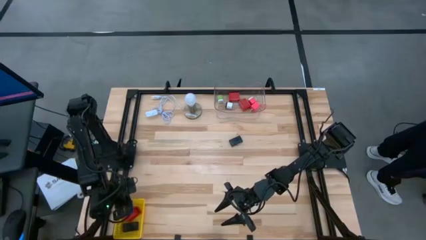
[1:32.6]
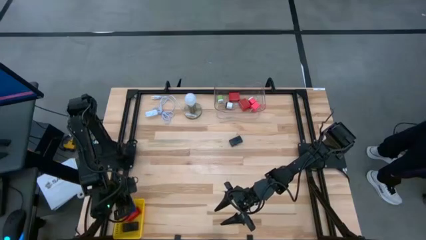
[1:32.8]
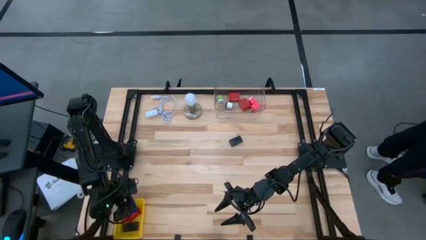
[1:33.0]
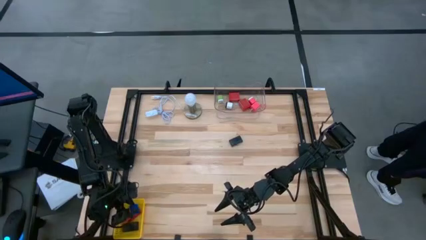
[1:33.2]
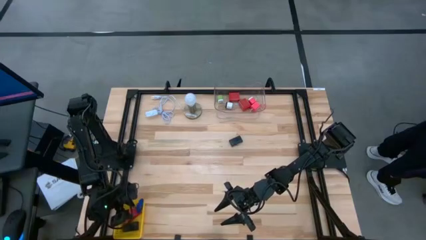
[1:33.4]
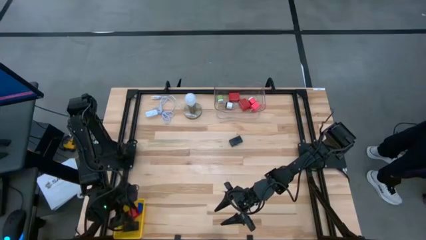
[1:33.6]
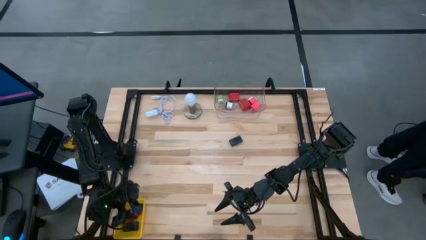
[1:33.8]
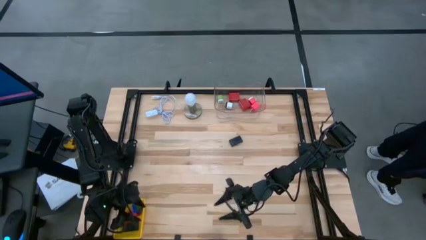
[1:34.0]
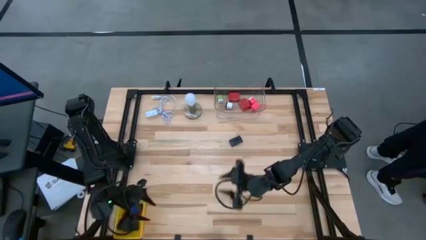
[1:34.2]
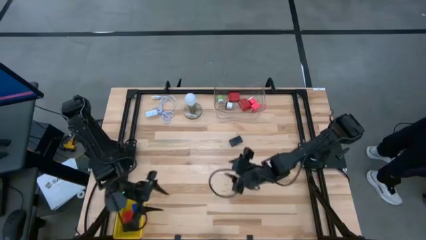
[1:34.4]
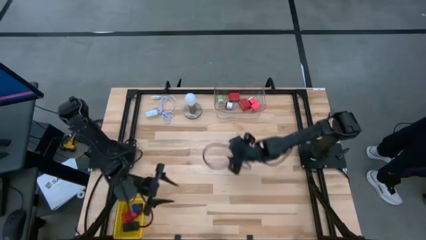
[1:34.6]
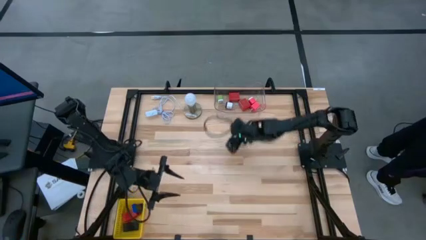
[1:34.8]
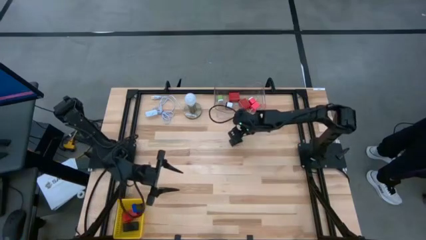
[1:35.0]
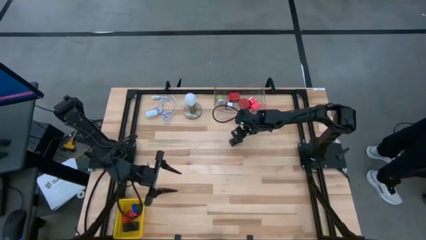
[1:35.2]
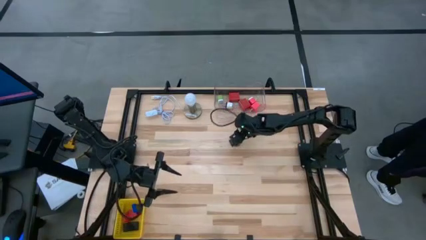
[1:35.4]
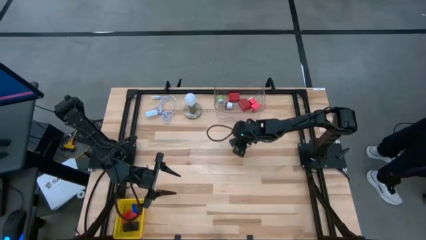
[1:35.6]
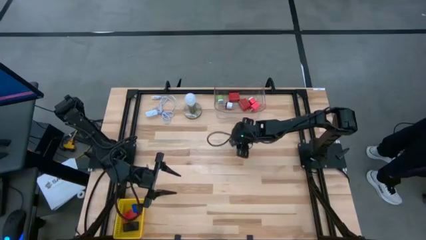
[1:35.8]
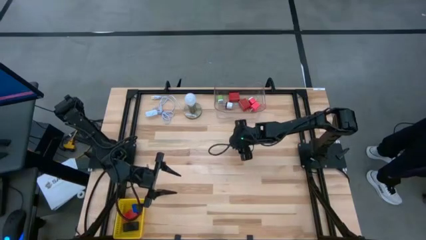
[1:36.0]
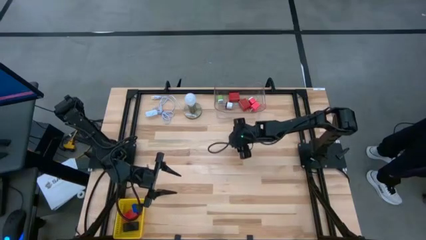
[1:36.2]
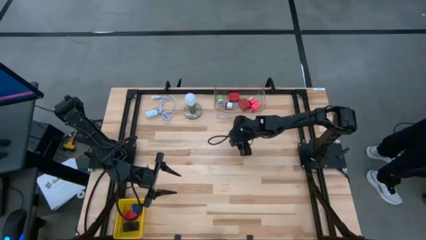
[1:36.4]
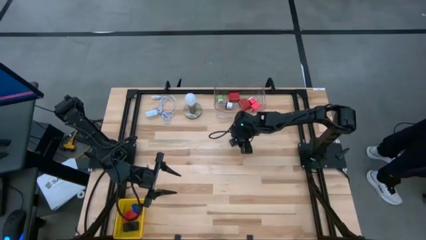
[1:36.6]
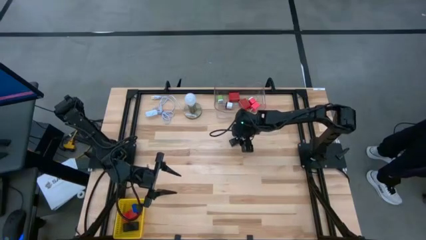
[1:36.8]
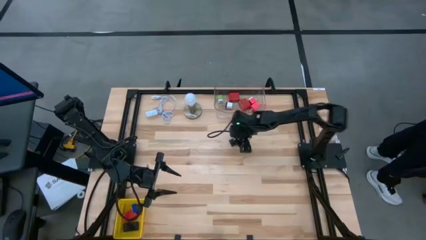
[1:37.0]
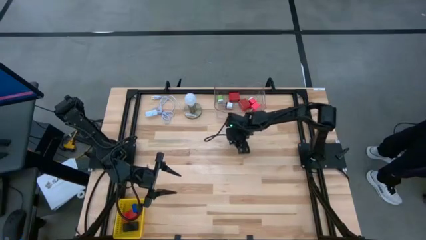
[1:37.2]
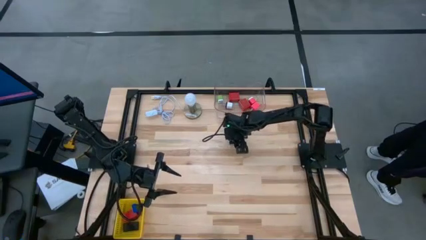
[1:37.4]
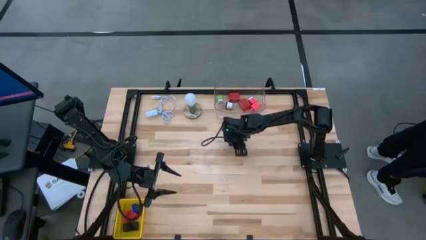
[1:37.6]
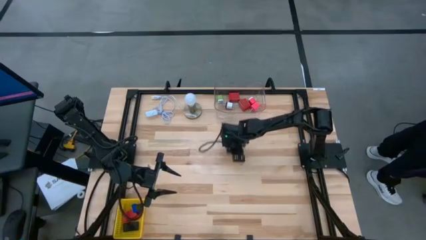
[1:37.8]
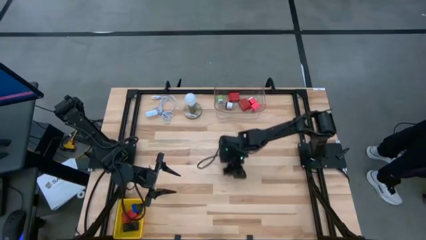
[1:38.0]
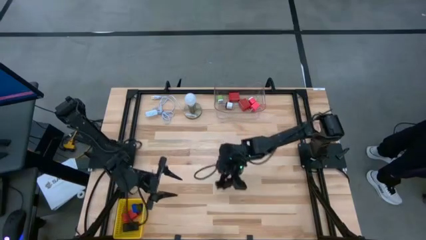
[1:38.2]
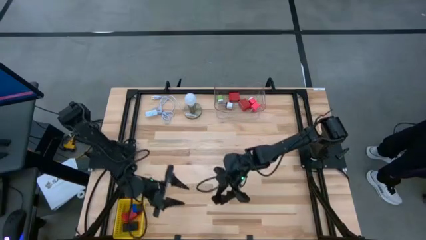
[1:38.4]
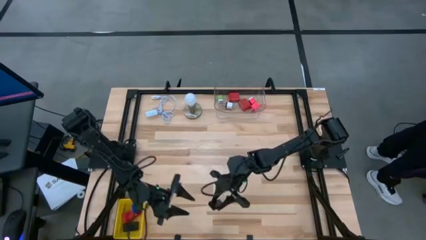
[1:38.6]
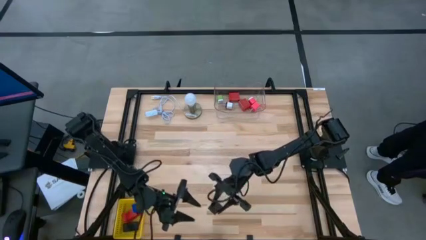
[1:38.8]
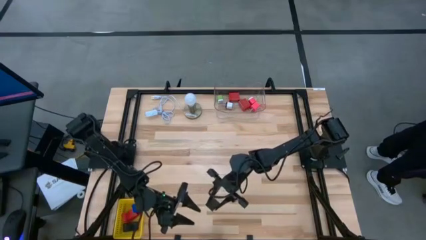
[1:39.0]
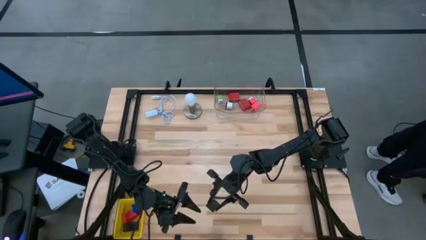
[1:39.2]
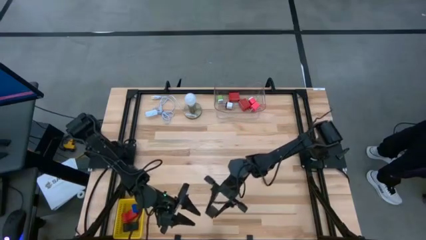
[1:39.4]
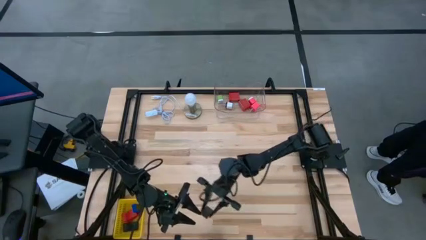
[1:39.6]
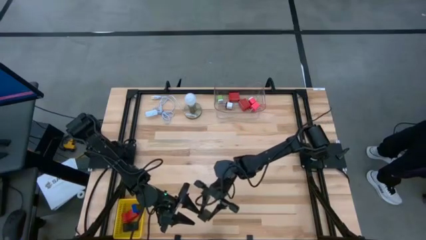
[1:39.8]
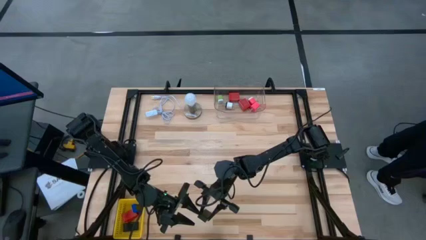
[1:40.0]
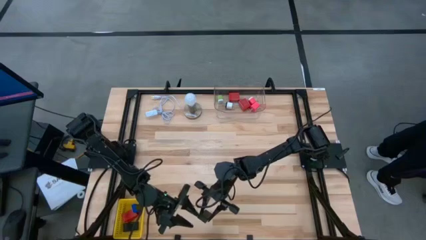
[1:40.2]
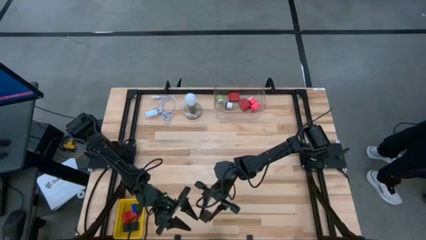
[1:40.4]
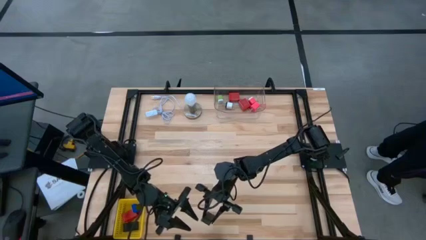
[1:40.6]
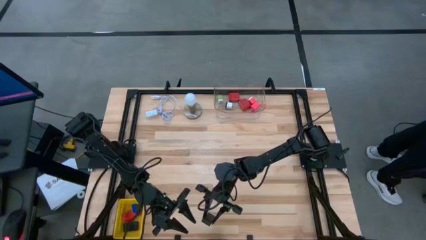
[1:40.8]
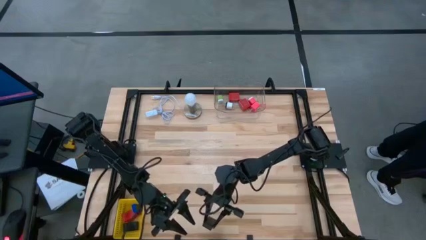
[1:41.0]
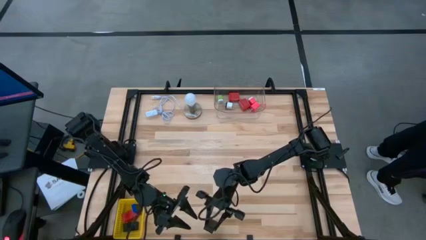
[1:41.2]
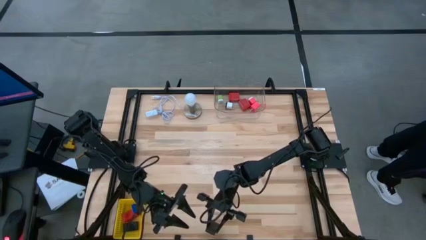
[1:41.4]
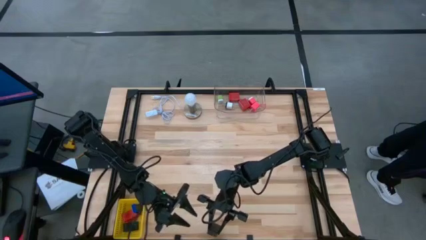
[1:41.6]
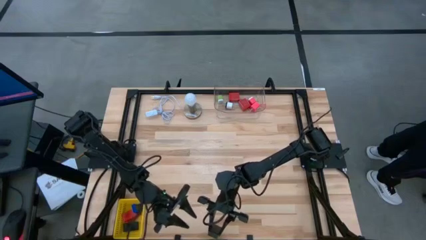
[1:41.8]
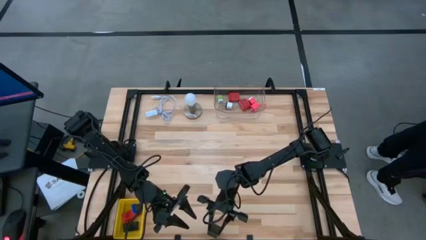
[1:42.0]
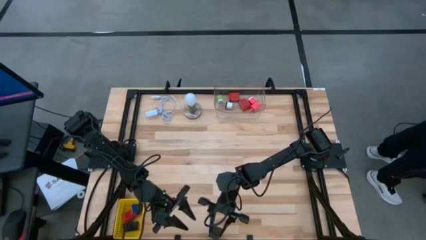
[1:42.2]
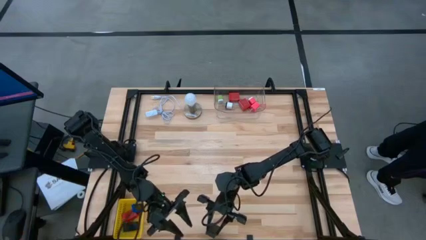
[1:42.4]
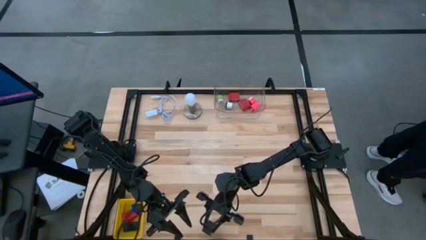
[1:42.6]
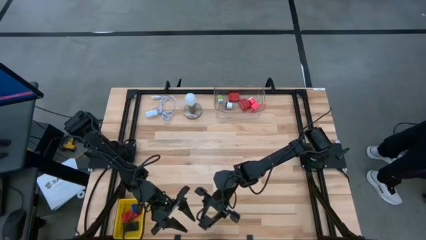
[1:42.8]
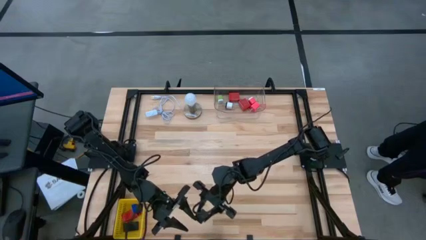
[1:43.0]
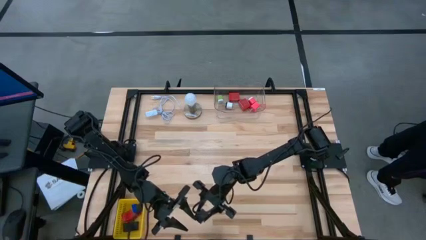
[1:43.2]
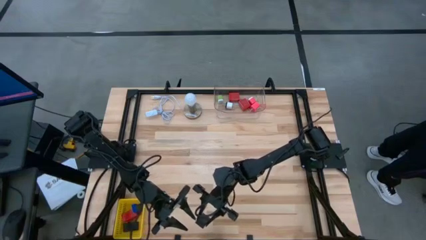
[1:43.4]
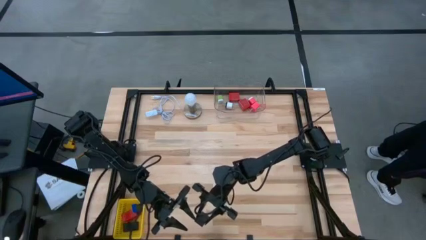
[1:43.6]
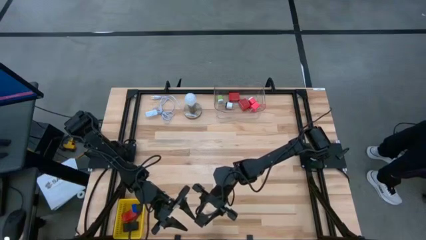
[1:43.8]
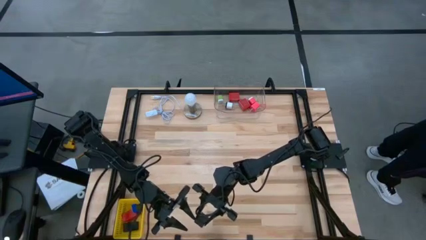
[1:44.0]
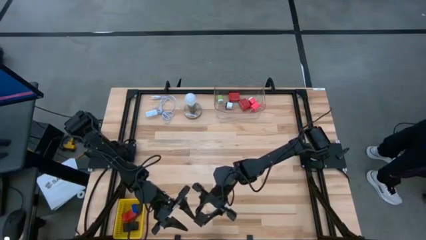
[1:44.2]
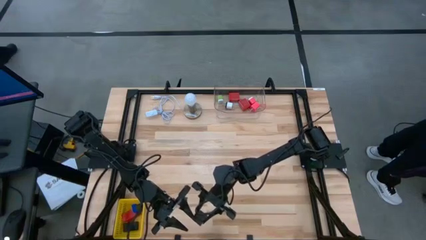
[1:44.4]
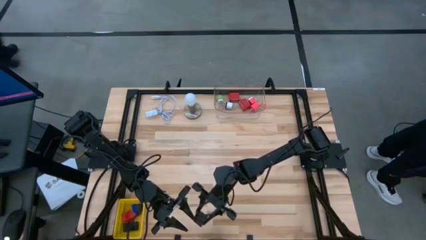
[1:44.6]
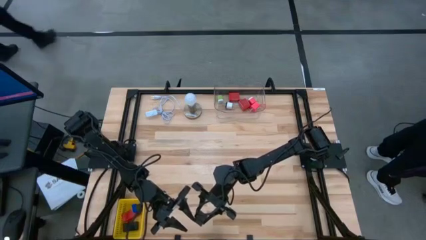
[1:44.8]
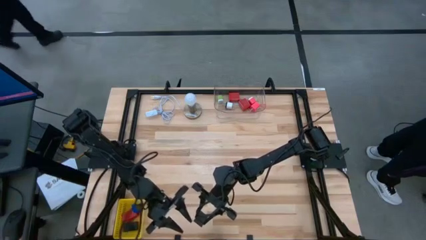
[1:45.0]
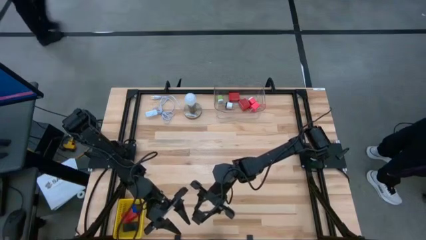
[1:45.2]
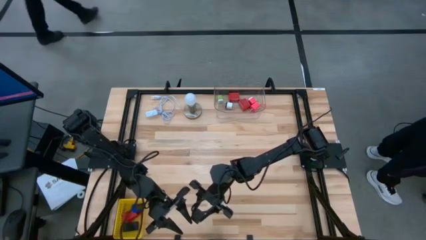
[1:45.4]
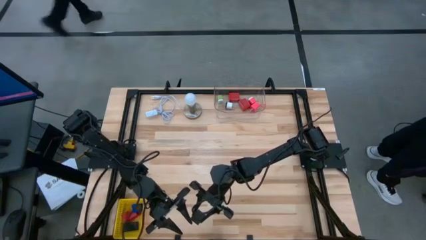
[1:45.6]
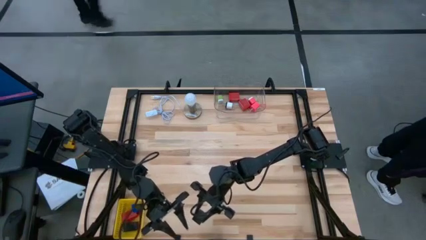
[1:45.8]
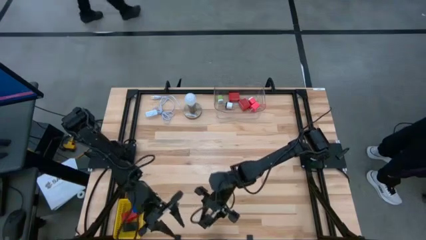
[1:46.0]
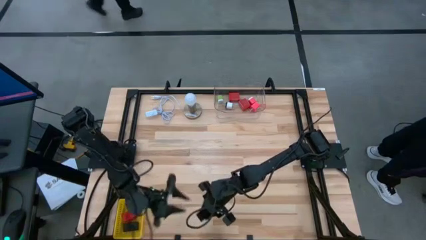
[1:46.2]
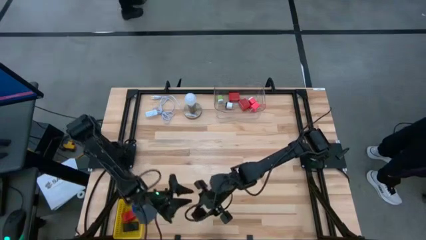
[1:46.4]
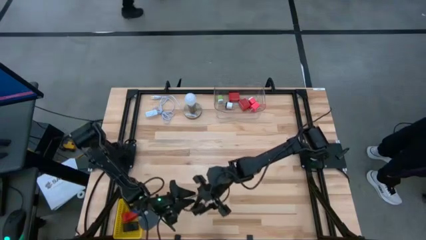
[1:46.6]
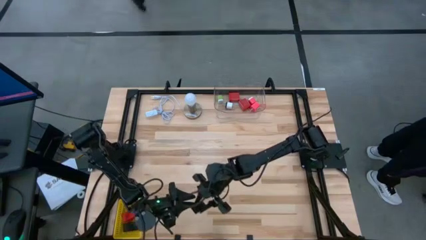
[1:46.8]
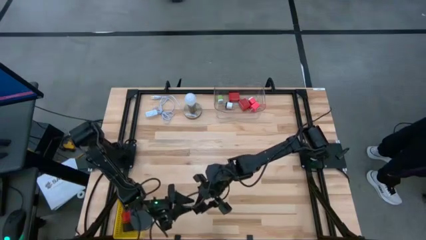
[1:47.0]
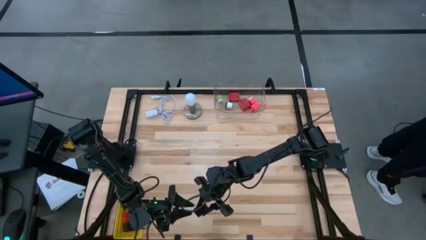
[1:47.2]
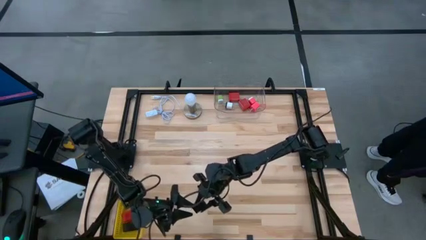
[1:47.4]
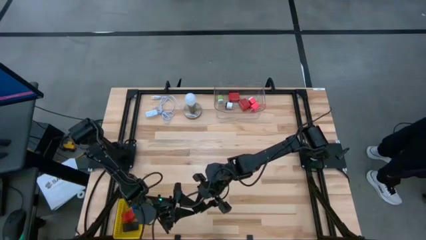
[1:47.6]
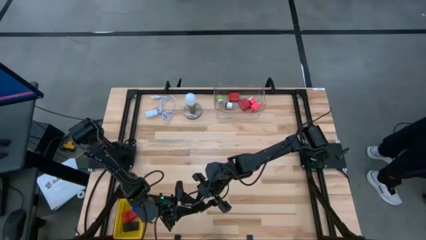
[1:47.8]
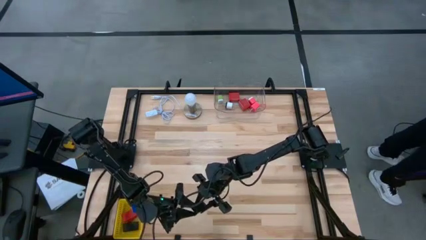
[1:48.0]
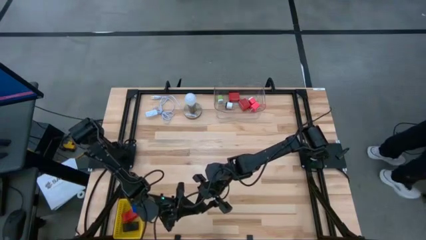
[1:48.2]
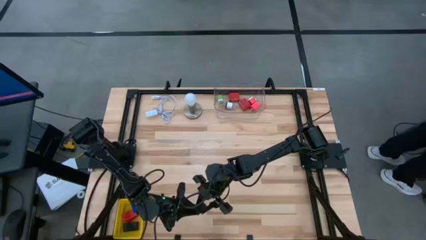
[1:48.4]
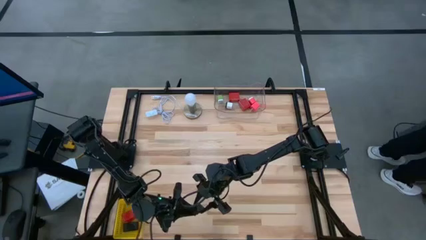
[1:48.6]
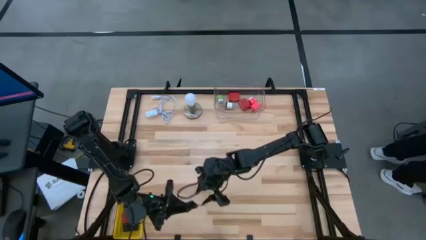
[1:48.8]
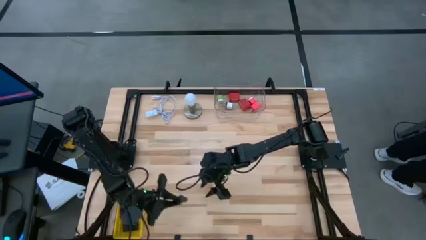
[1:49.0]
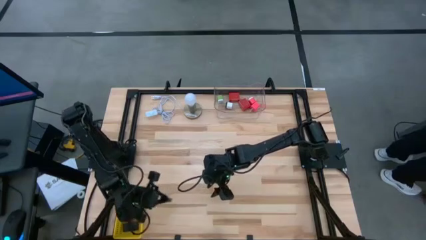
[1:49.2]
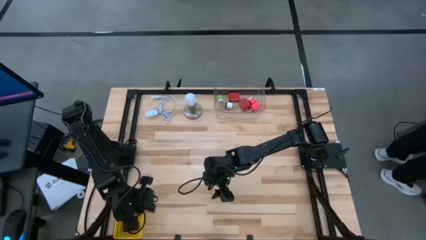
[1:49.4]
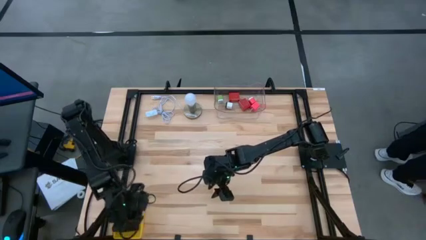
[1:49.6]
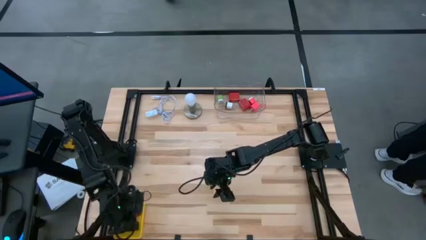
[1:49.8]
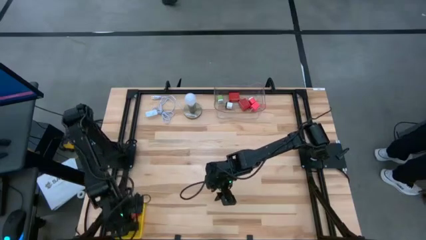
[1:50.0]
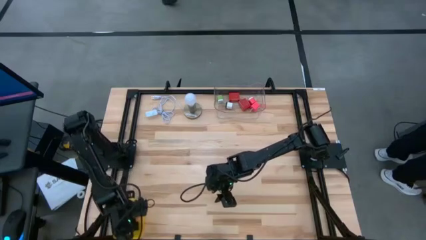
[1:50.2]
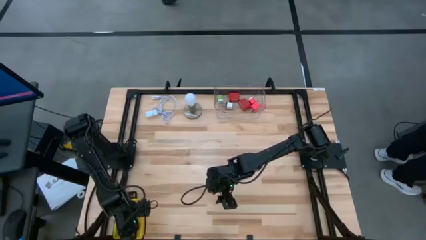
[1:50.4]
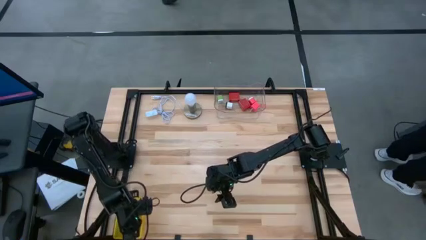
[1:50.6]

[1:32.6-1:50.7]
Task: Pick & Place Office items
Put the black digital clock into the yellow basket
